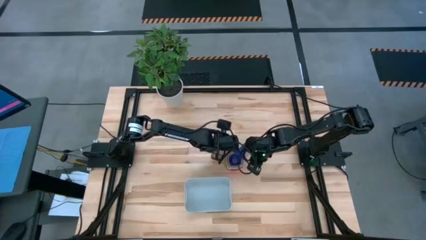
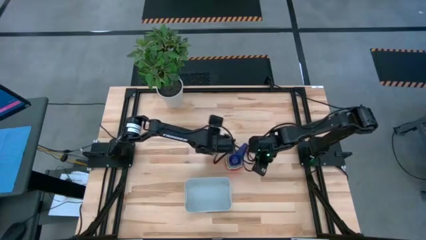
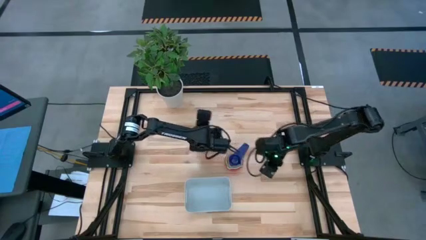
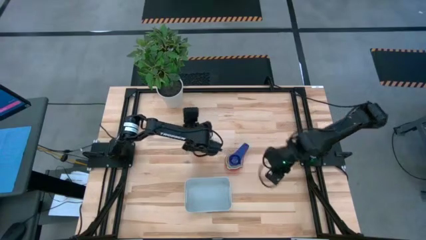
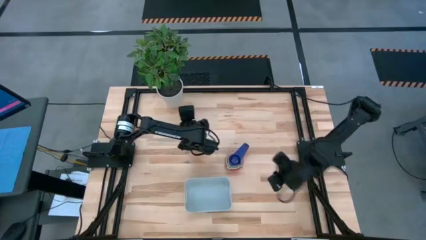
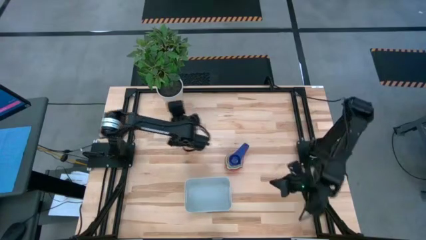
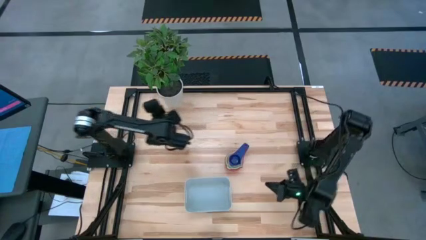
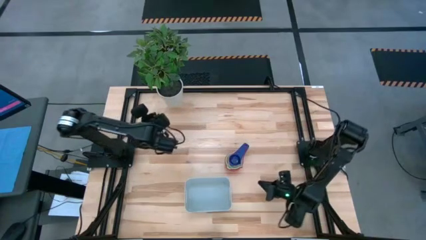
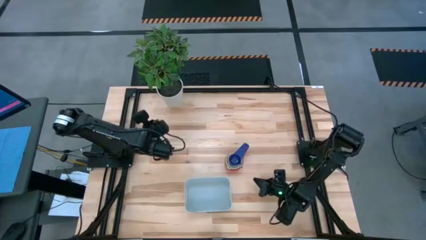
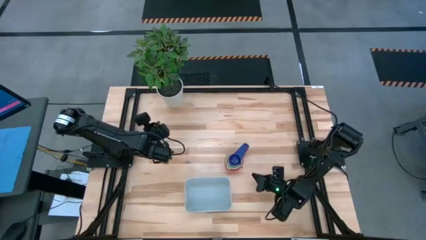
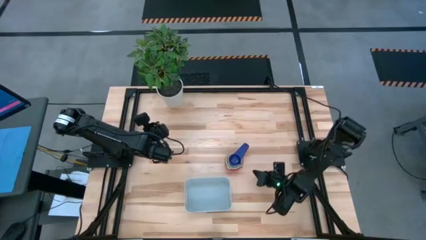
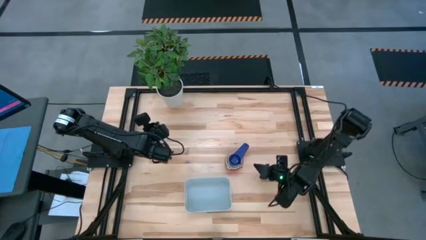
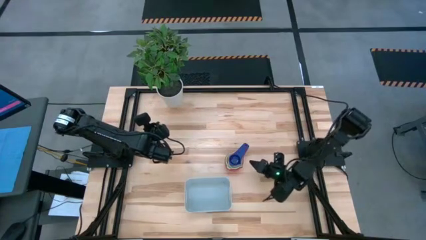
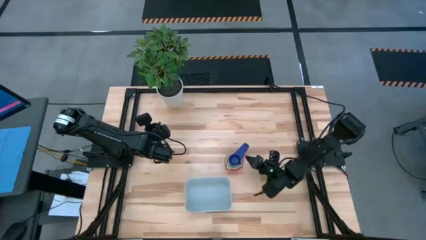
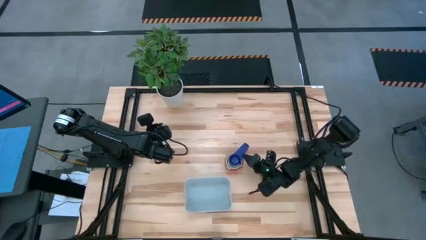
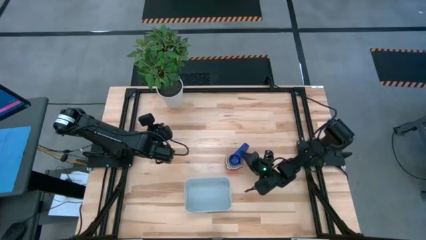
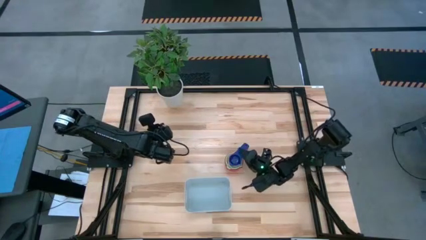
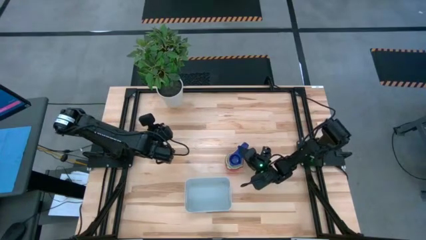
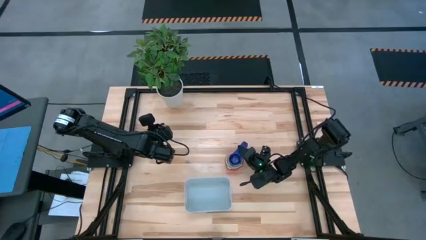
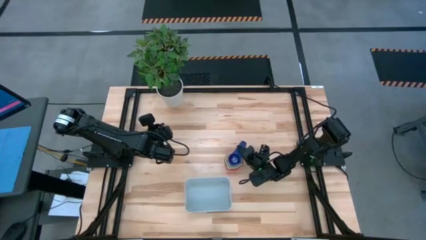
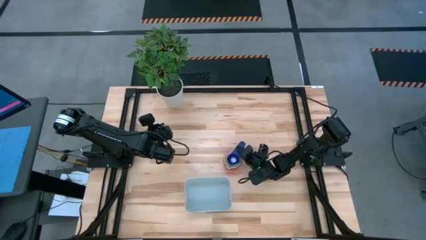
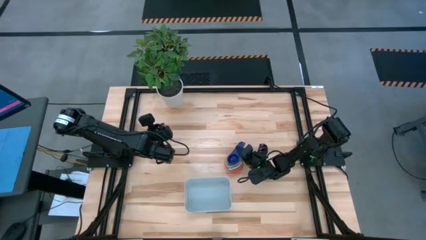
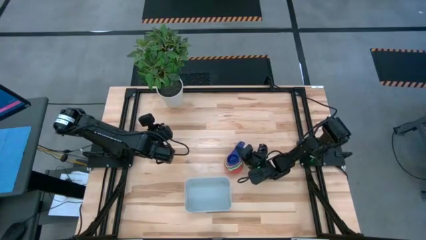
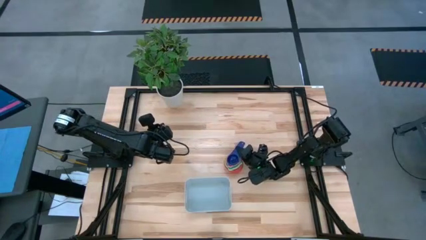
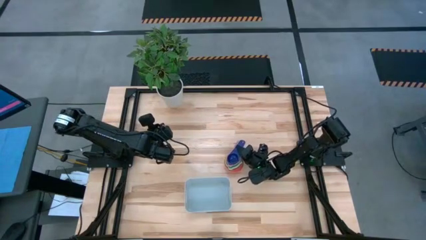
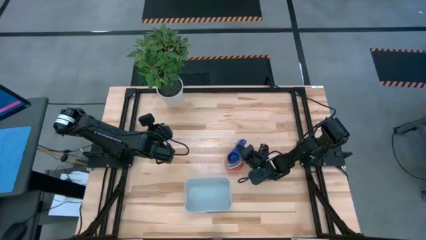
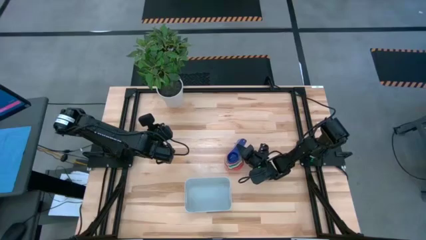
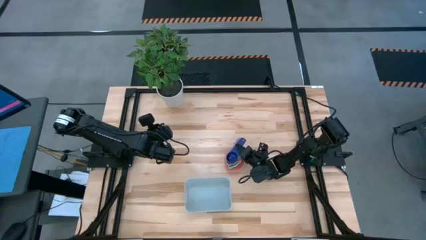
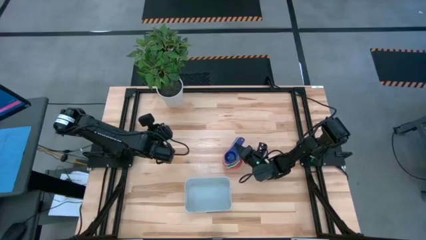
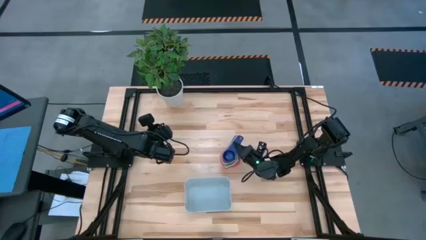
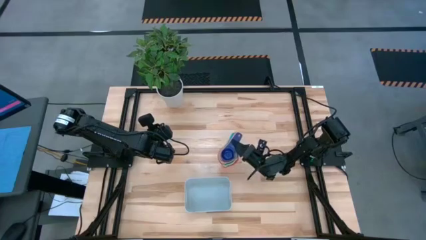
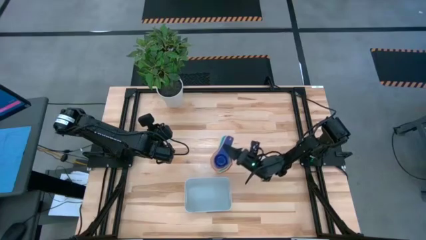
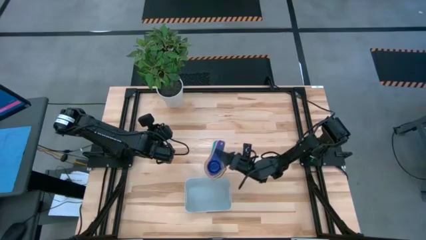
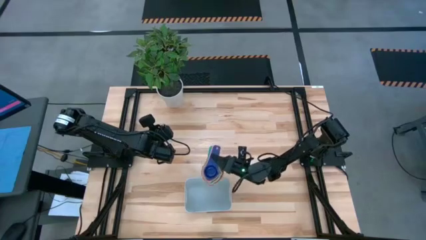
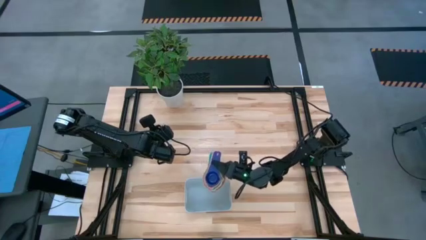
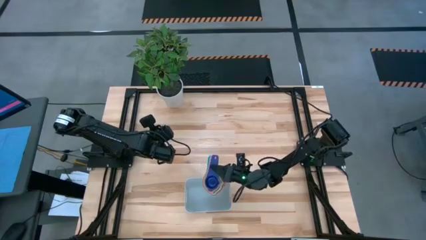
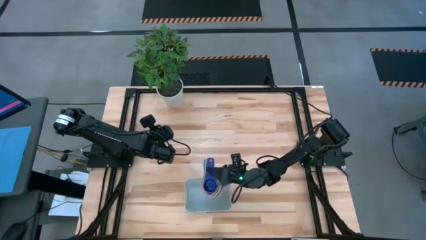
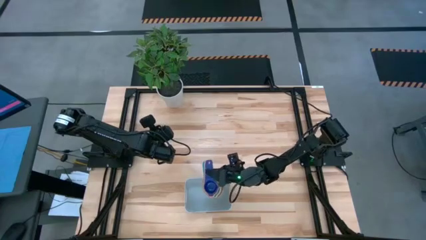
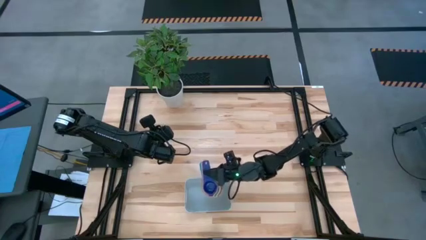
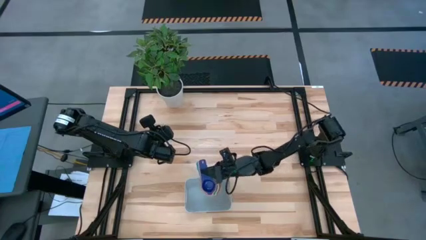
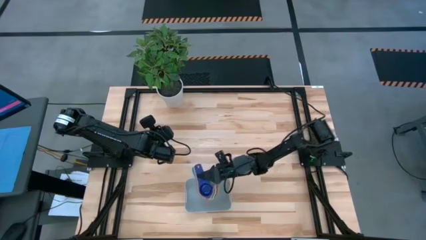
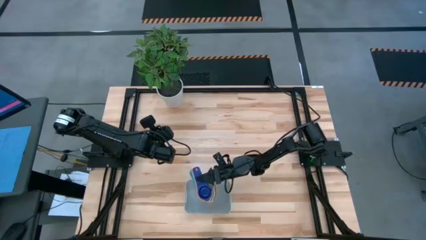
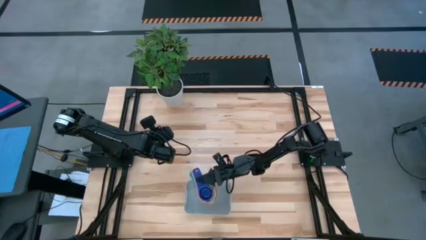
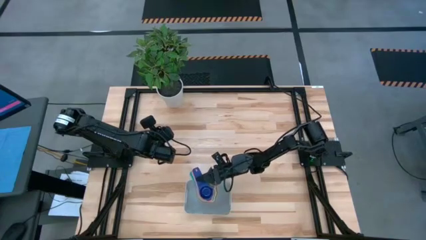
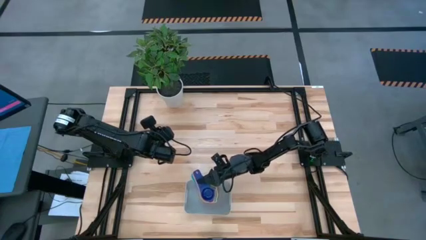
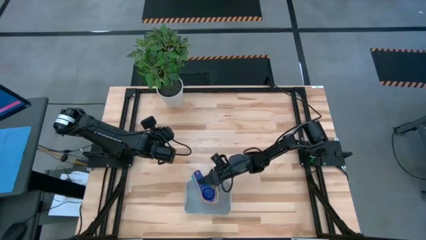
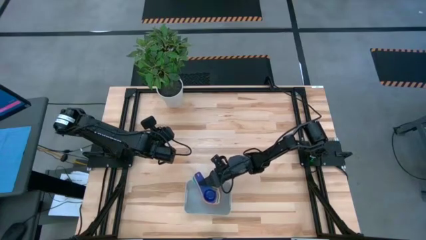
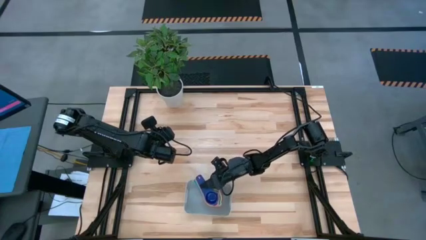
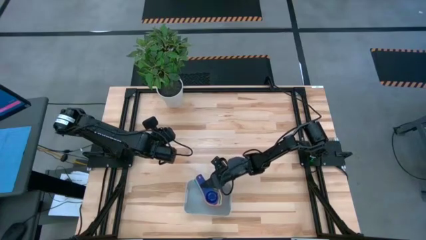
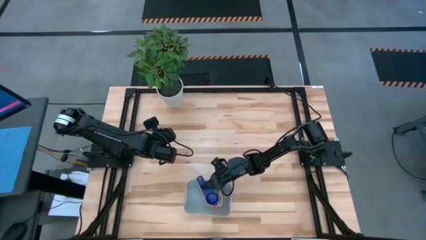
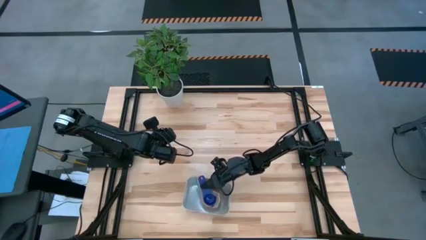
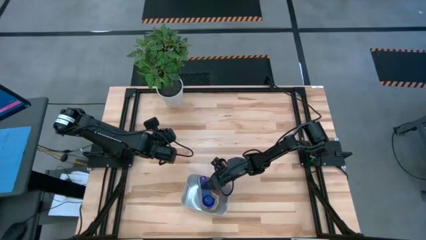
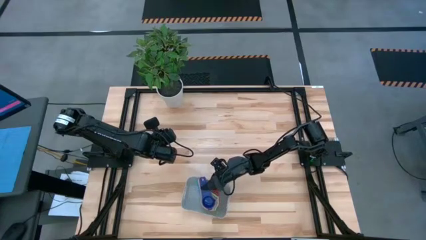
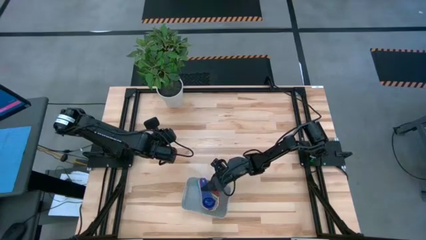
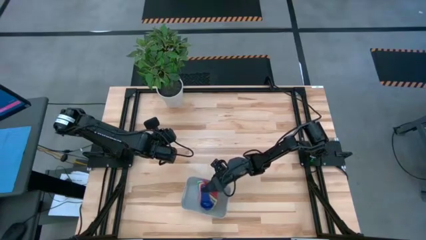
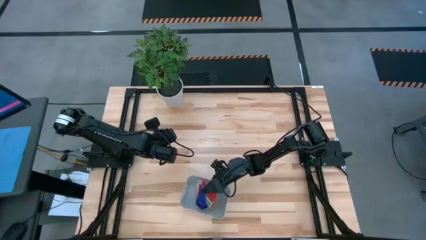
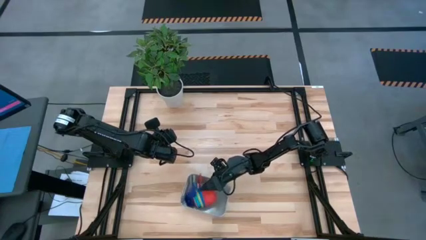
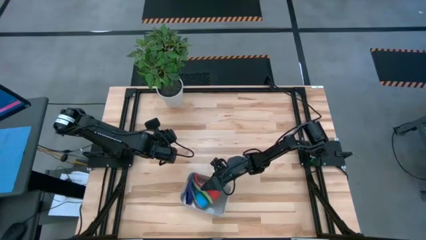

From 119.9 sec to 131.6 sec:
Task: Nest measuring cups in basket
Put the stacked measuring cups into the gray bin

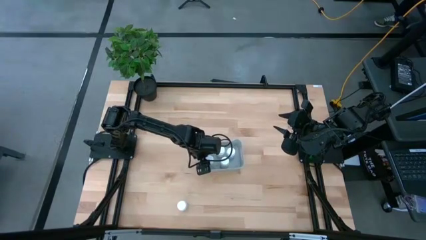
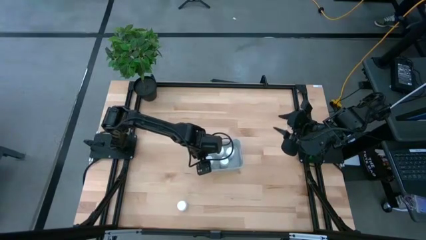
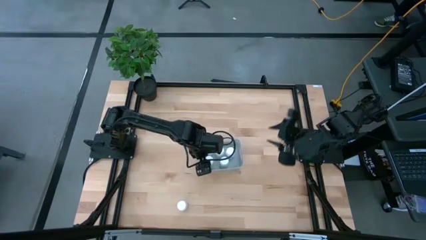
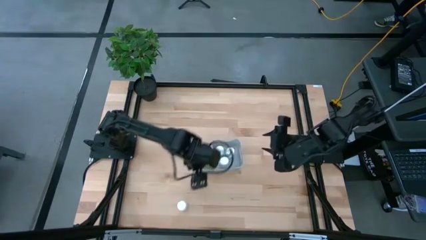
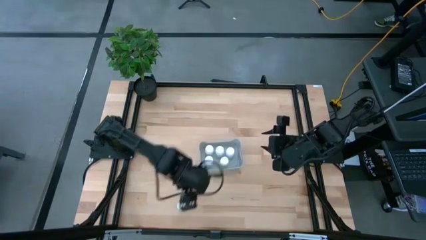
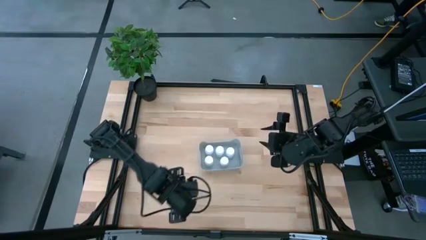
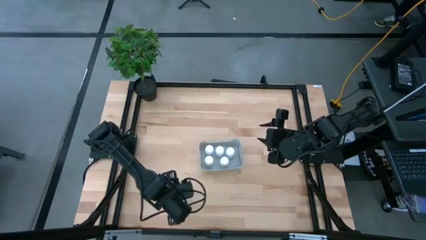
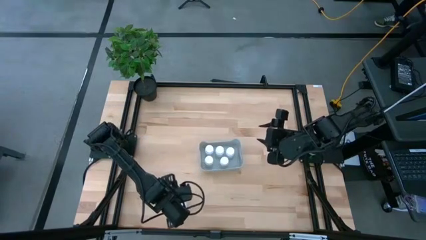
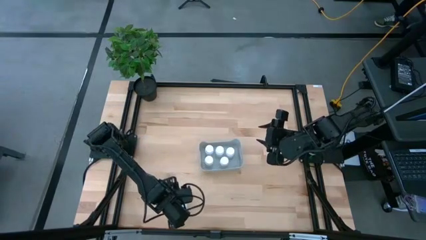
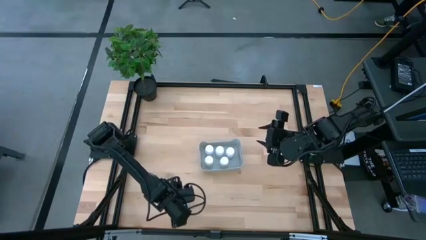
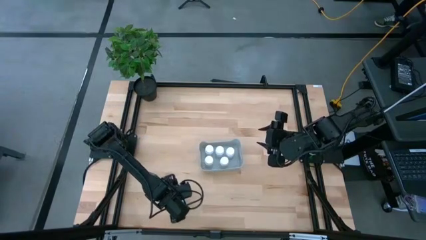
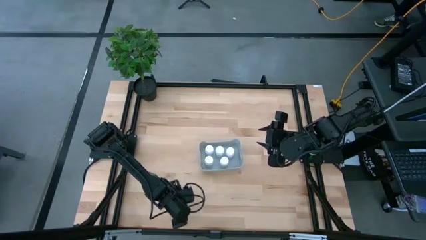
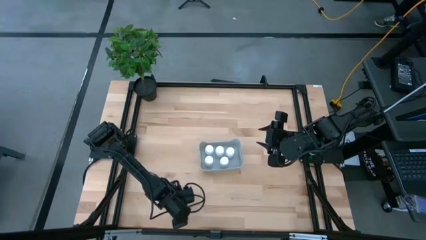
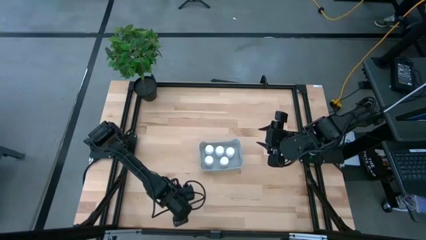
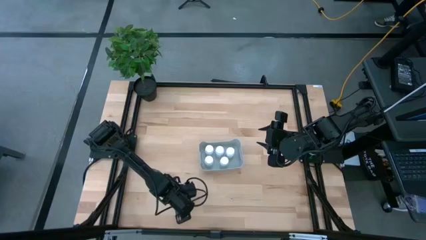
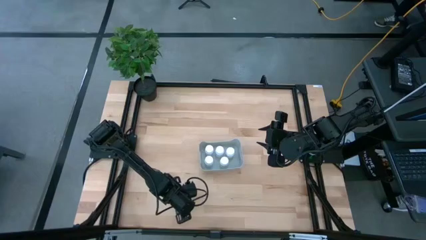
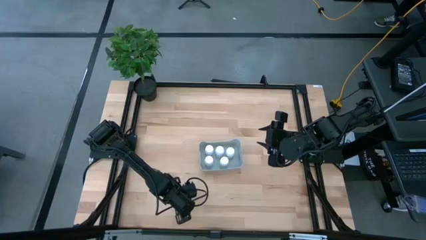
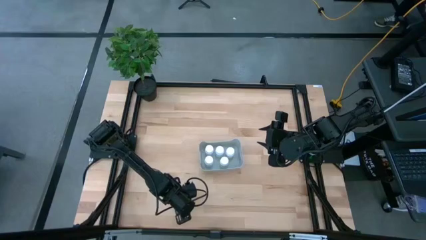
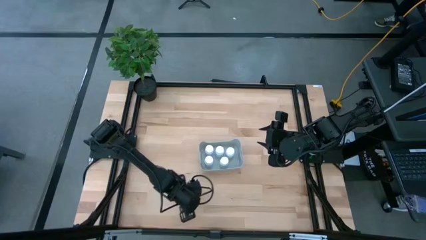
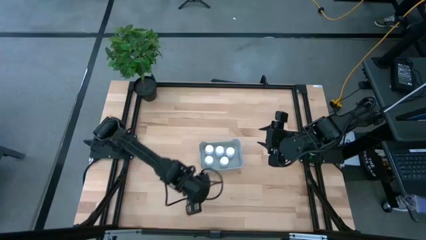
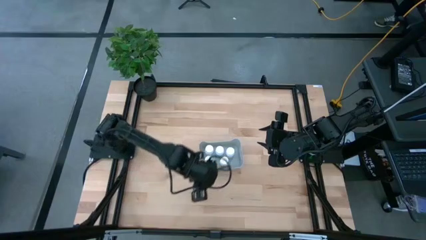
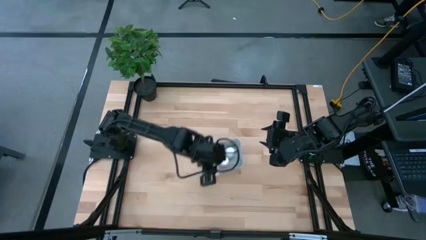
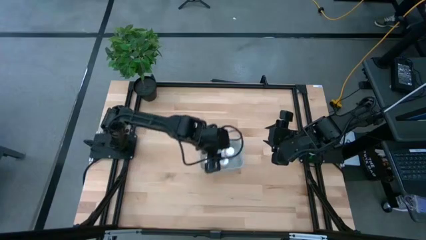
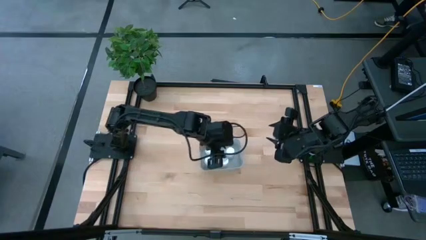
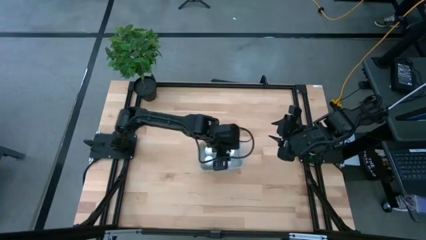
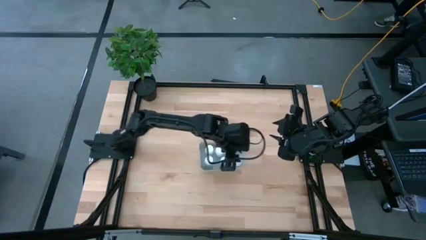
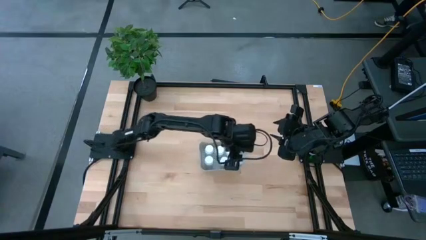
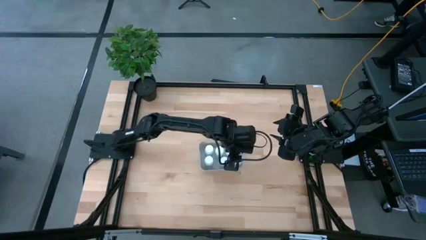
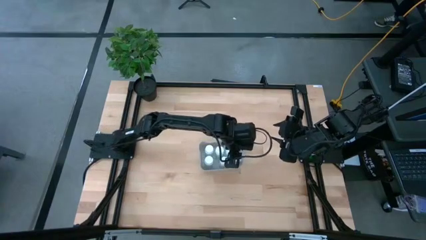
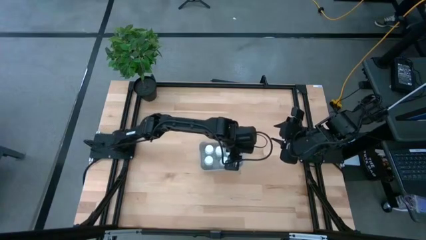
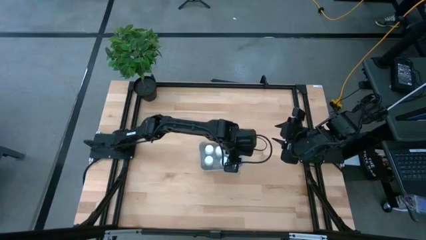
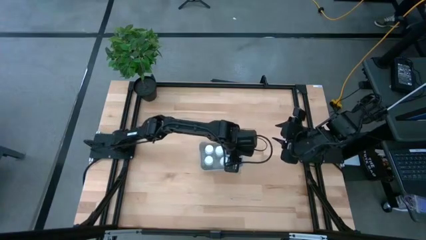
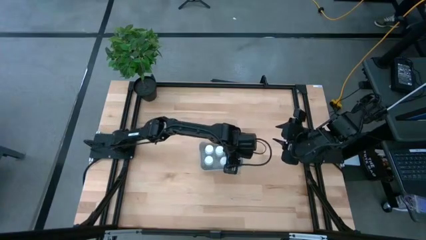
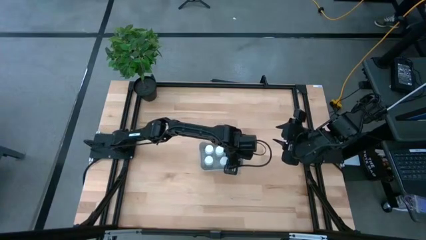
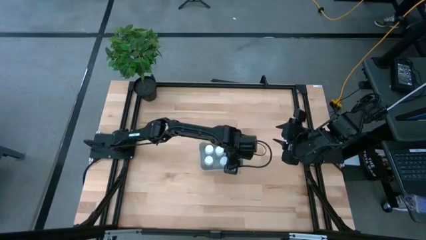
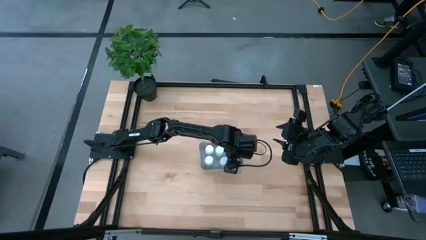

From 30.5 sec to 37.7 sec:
Task: Pick and place pill bottles into a basket
Put the white medicine bottle into the gray bin
